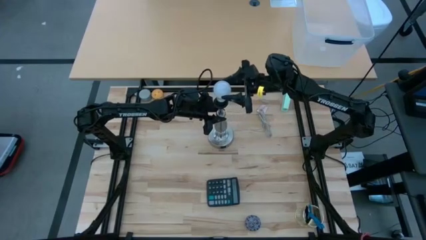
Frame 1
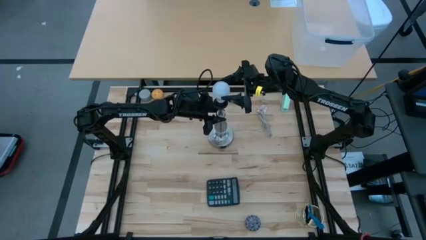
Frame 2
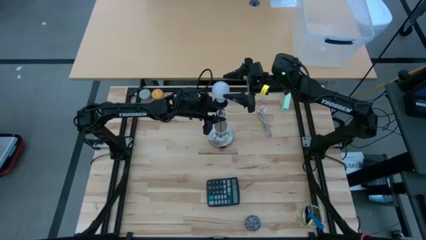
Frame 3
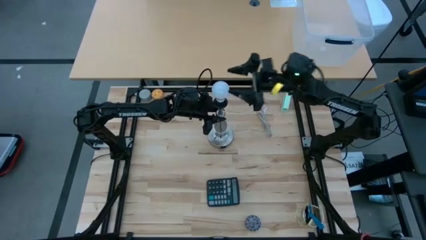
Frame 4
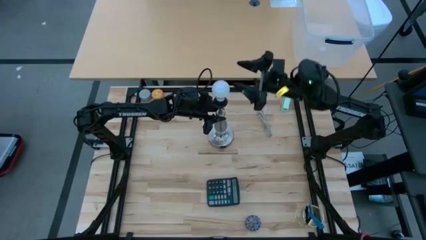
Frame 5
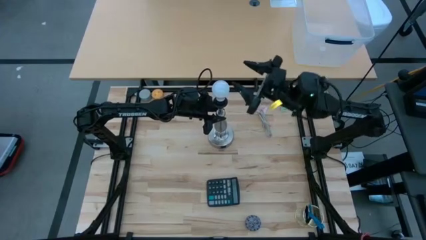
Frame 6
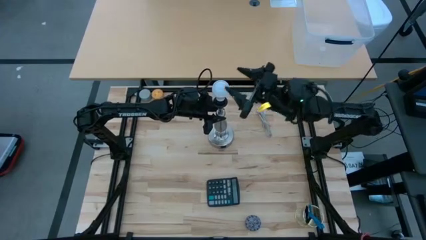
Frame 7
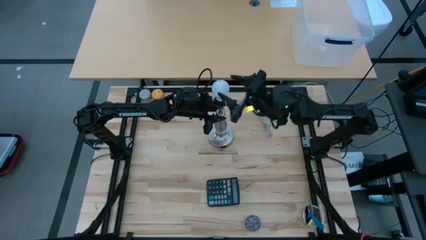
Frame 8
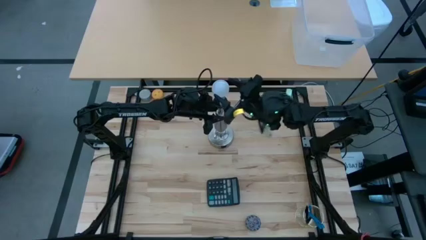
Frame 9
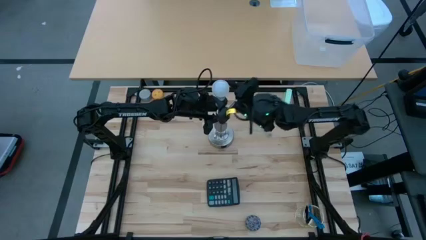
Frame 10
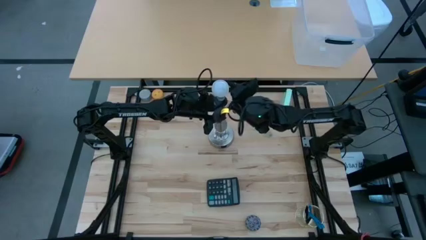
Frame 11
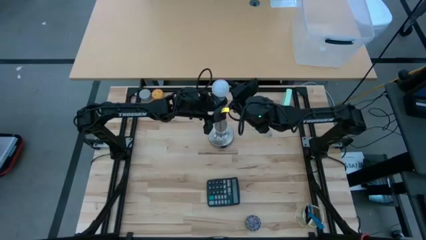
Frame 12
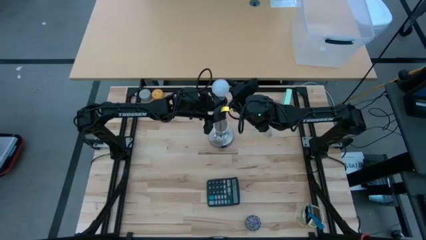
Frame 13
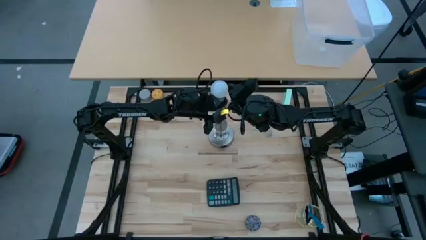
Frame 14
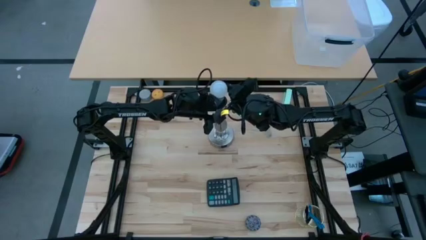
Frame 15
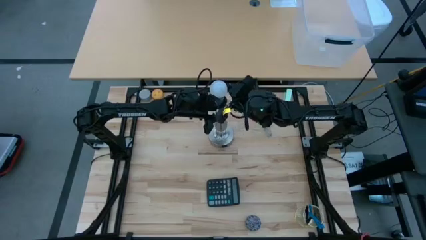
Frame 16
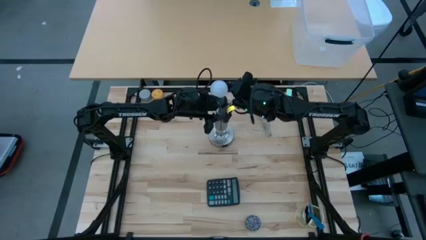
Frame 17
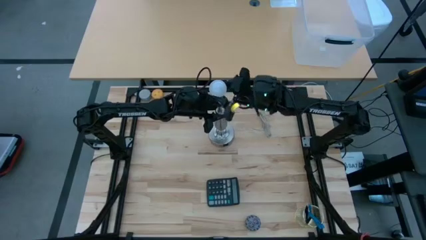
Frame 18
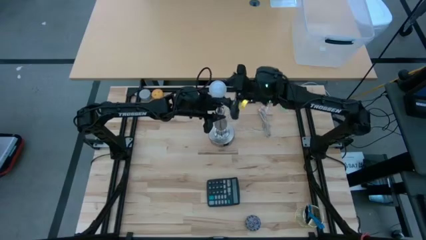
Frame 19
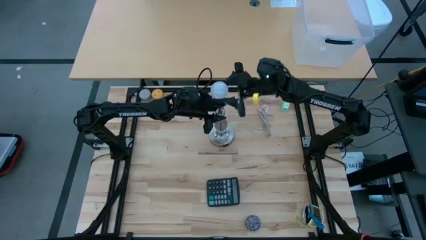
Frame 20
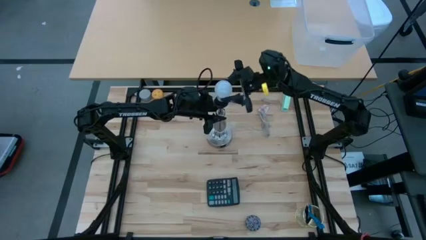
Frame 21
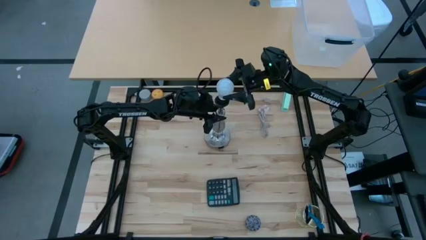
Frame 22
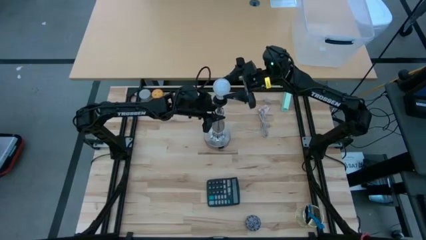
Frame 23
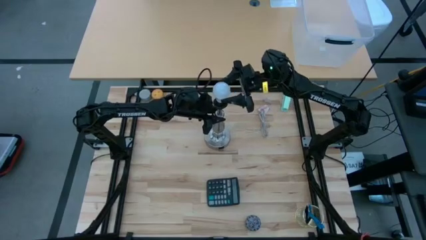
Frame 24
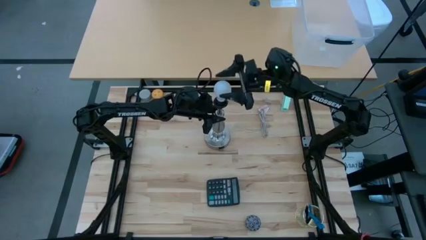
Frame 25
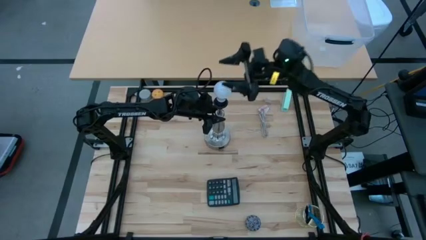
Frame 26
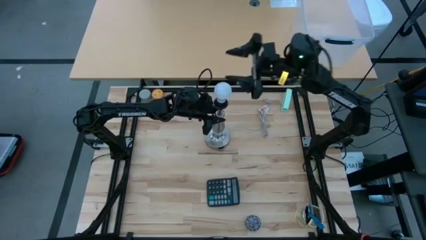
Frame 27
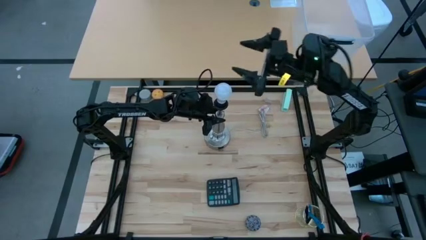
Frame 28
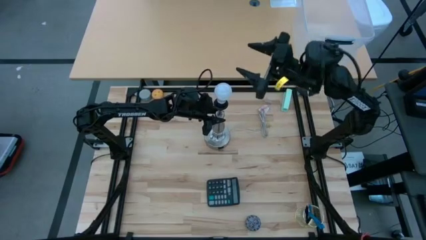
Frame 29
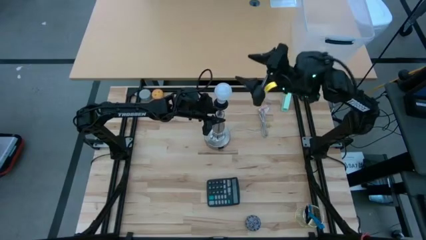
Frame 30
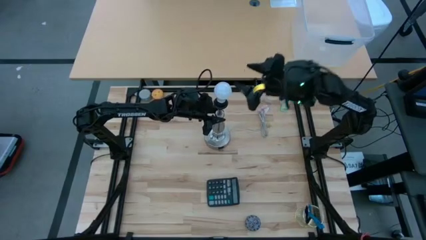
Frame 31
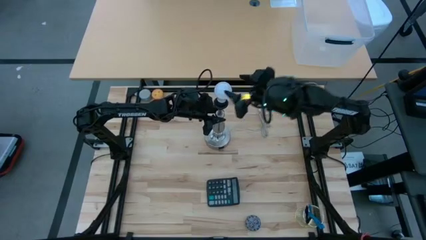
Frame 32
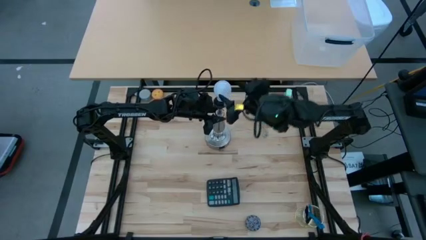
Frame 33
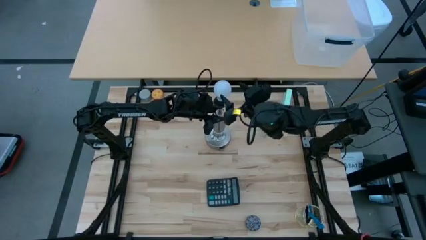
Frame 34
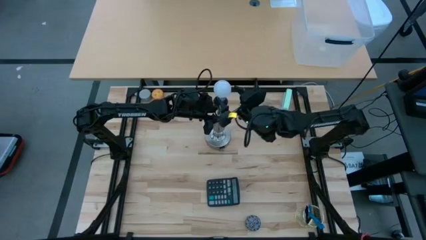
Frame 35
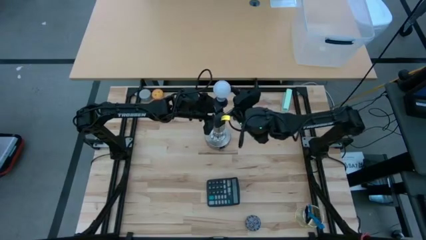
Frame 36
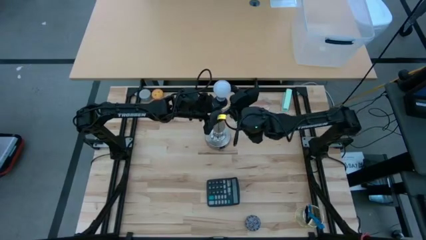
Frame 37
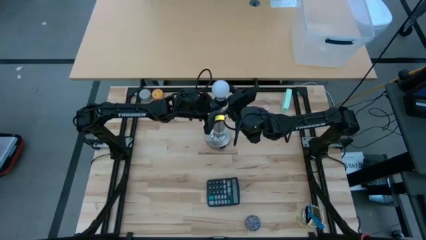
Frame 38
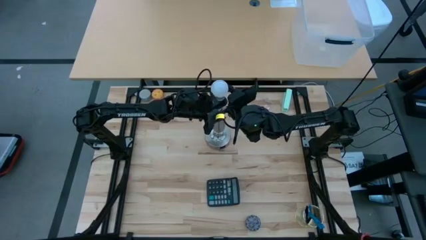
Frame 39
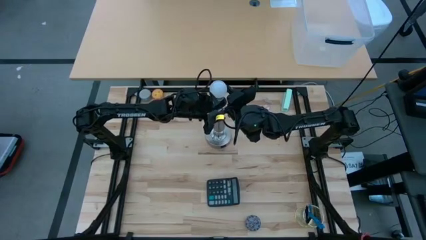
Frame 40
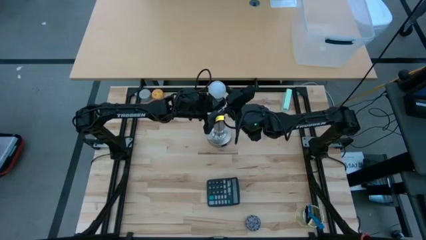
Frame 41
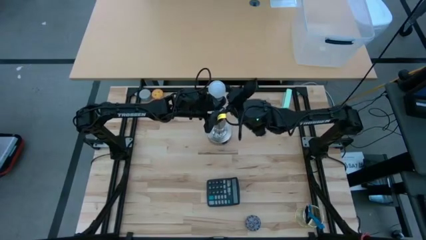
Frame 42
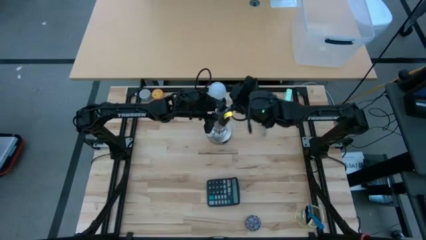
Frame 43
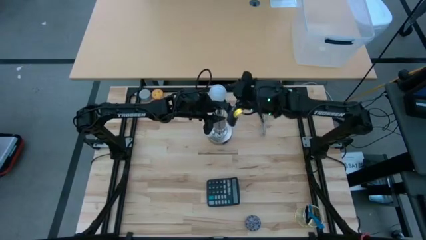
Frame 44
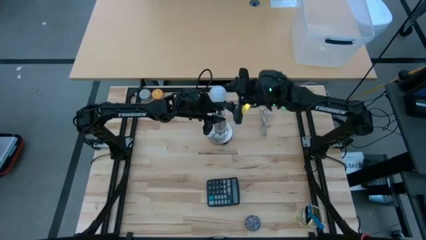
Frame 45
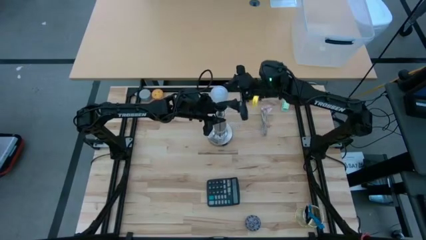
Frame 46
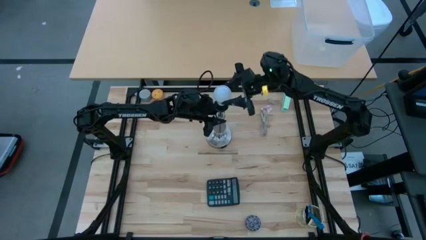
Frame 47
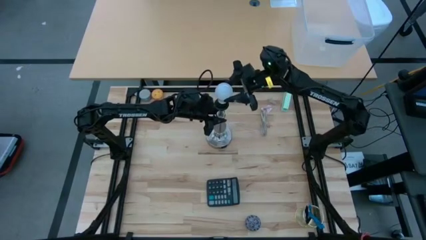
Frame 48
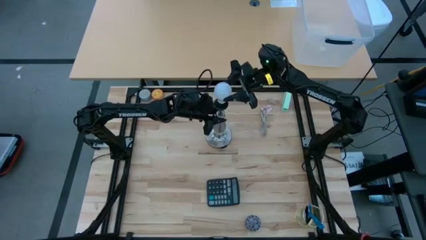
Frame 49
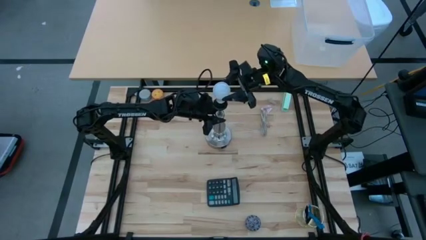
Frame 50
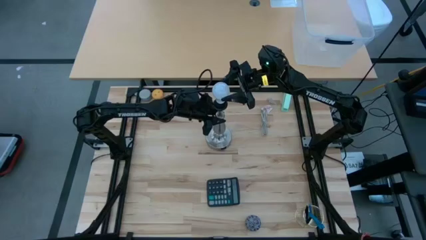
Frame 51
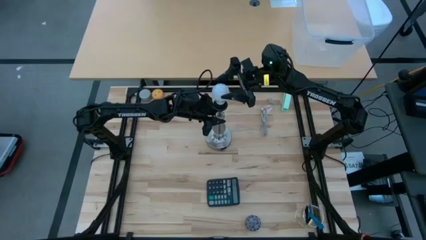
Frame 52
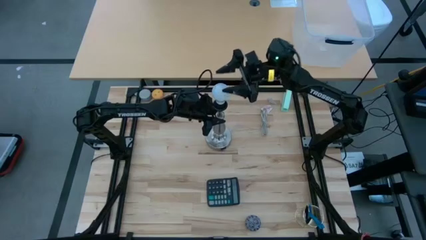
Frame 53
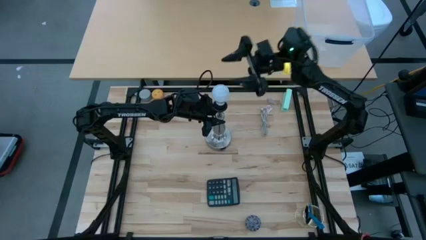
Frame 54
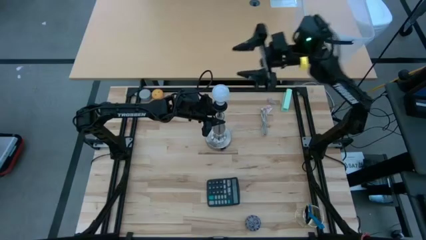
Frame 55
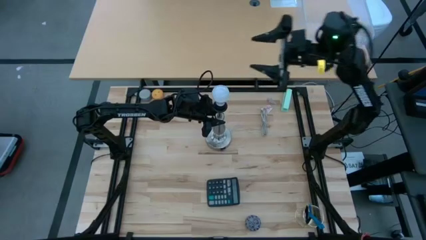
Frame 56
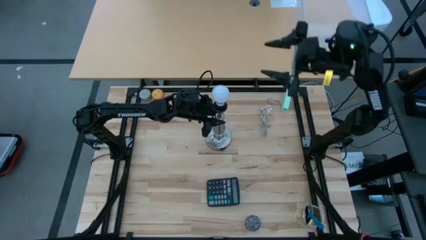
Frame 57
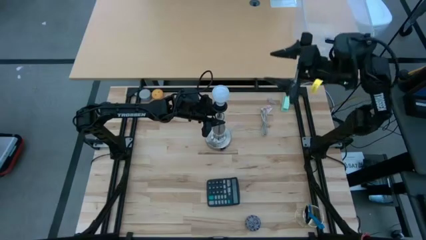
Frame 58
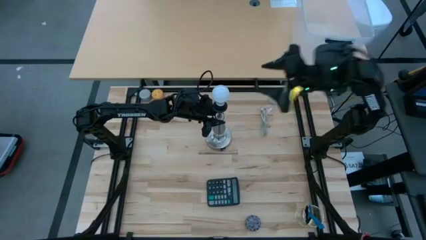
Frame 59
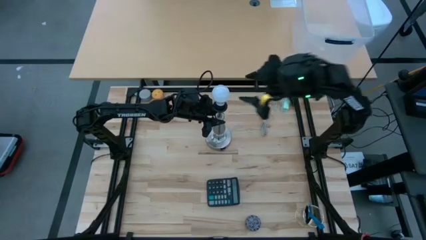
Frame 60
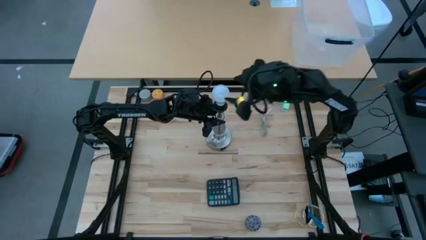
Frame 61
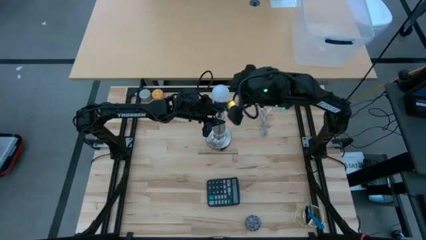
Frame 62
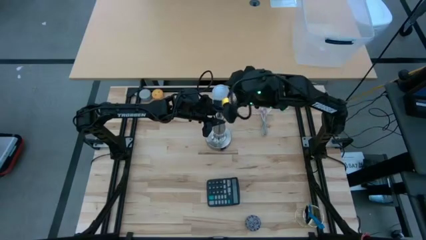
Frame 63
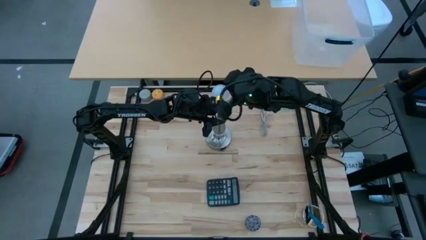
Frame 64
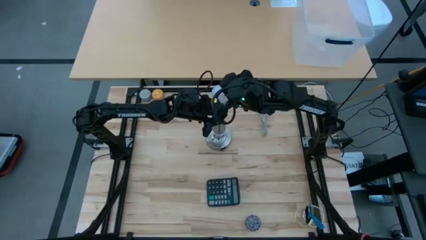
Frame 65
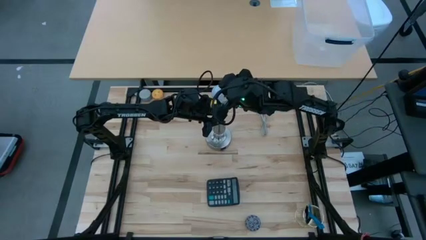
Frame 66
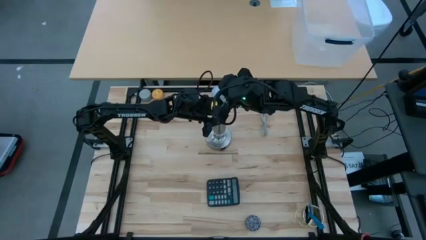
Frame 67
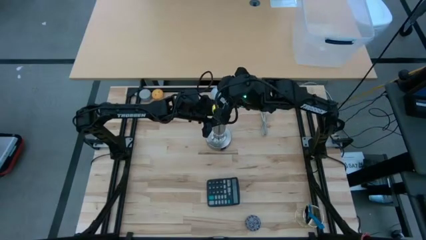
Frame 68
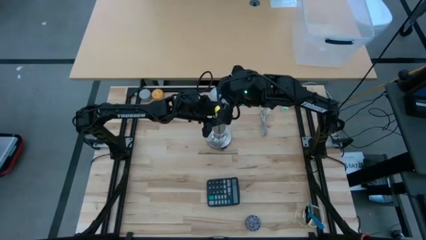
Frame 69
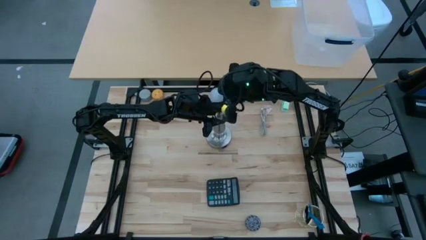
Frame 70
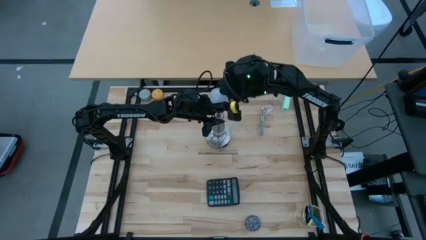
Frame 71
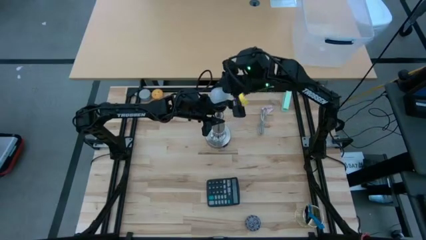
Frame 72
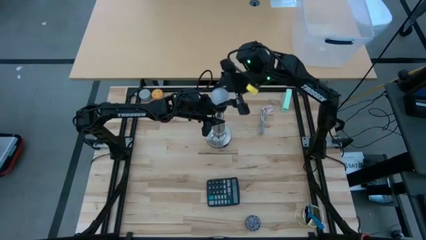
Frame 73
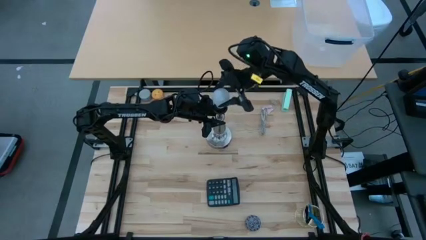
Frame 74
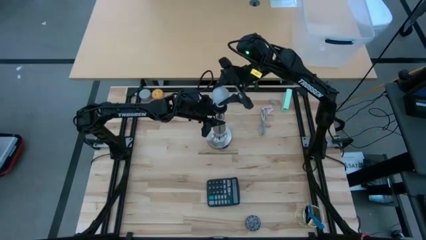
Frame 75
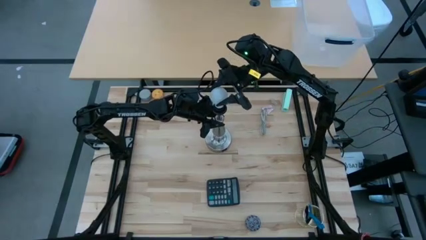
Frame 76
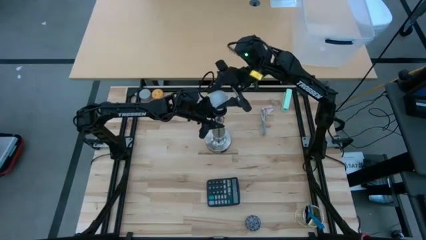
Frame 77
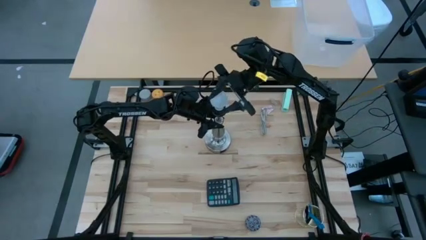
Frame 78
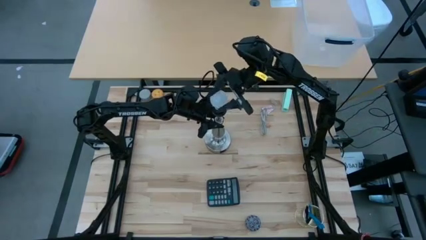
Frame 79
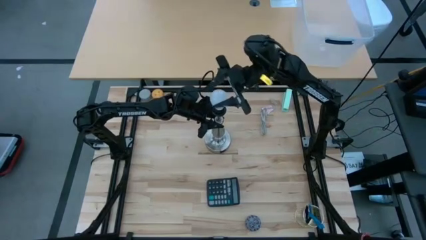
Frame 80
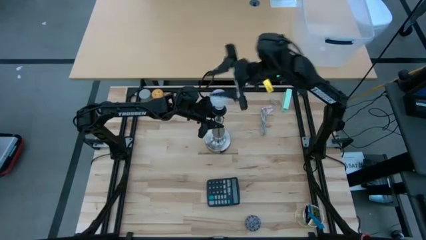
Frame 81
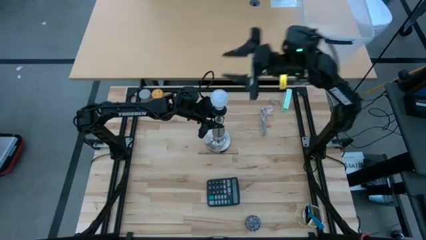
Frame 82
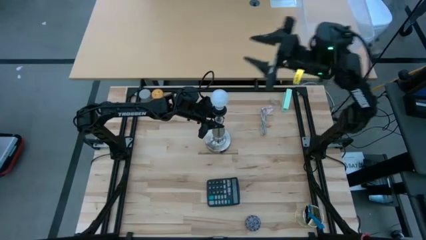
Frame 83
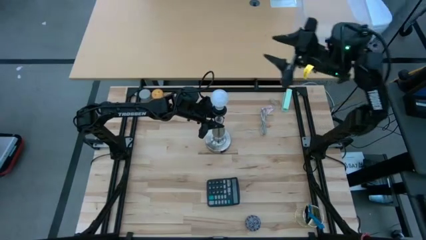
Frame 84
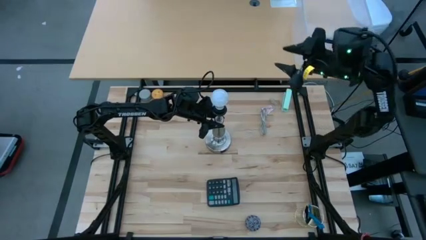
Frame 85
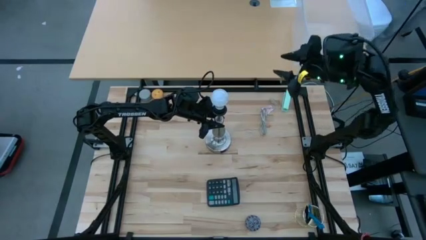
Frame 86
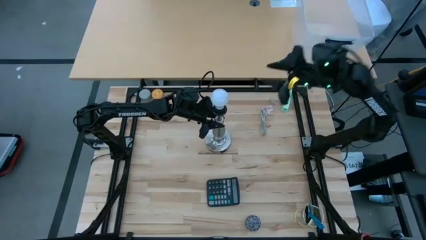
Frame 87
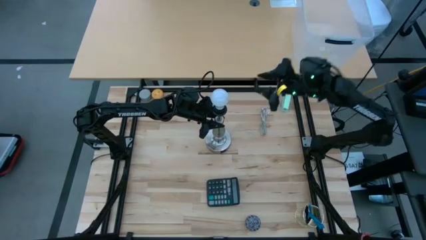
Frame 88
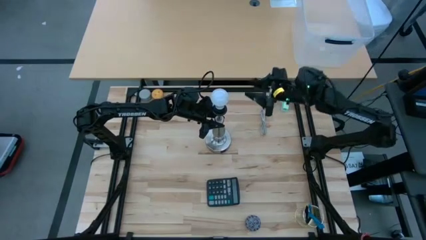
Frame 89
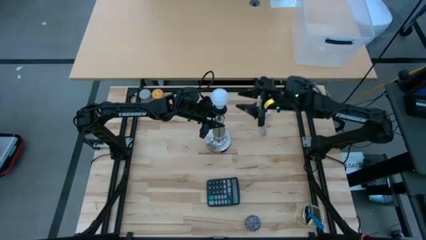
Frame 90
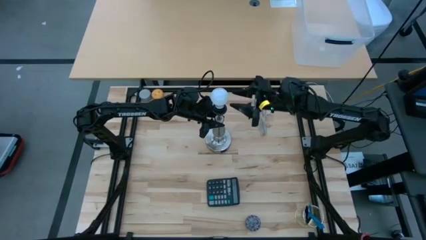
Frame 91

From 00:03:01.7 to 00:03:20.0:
Task: Screw lightbulb
Remove the light bulb from the lamp
